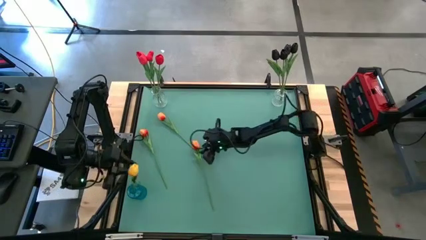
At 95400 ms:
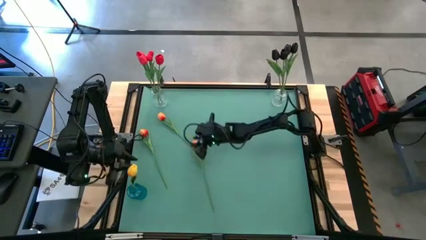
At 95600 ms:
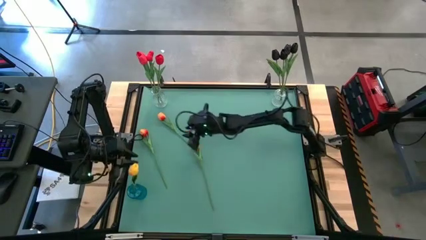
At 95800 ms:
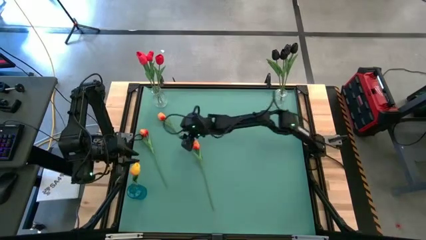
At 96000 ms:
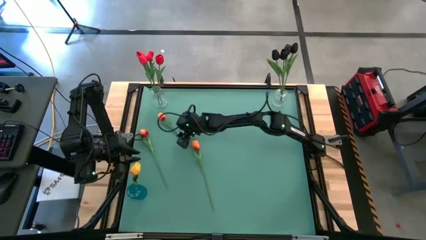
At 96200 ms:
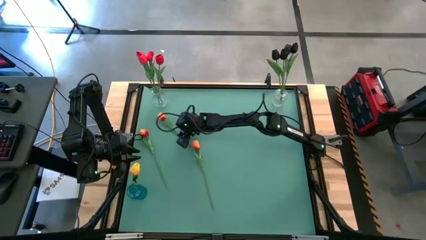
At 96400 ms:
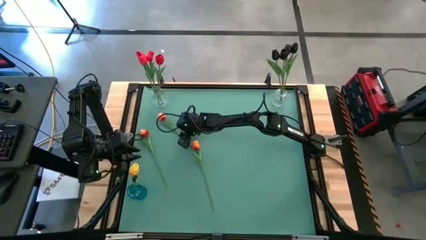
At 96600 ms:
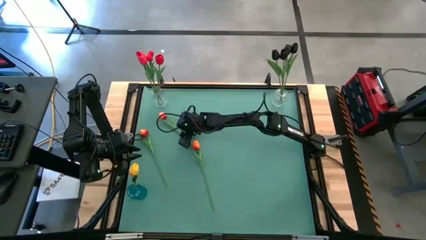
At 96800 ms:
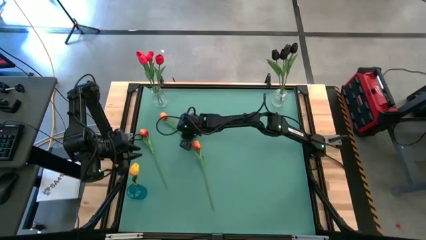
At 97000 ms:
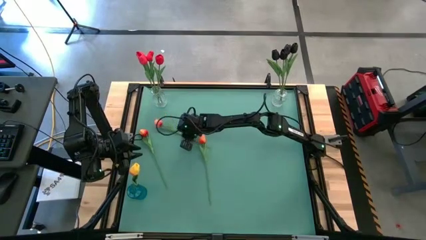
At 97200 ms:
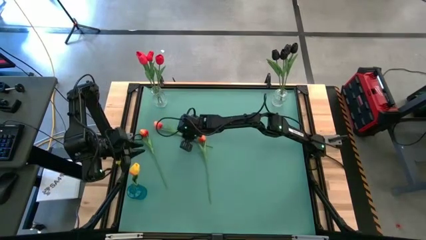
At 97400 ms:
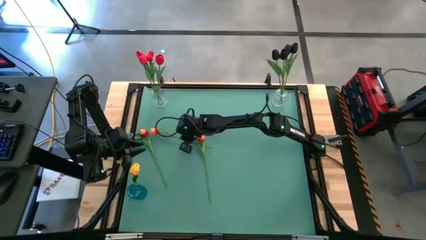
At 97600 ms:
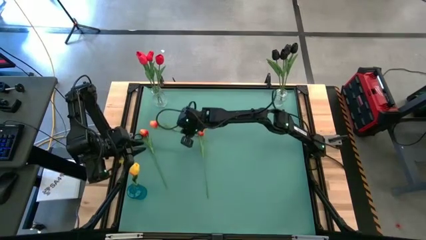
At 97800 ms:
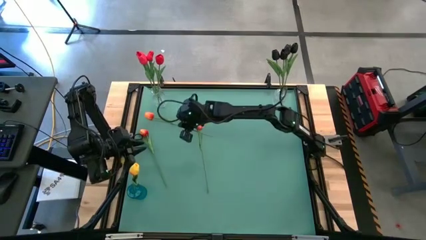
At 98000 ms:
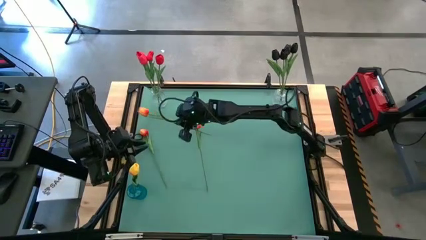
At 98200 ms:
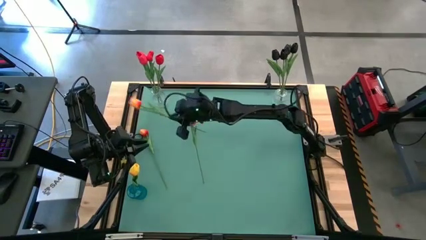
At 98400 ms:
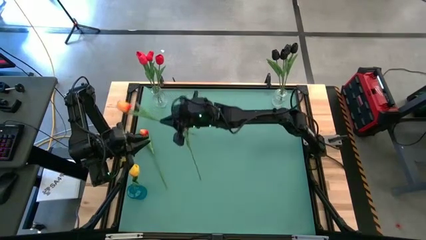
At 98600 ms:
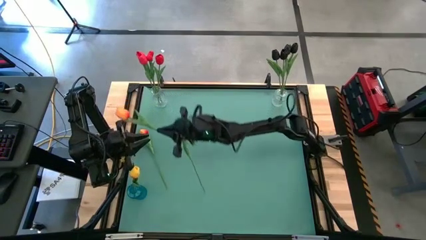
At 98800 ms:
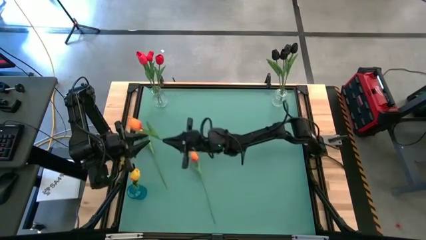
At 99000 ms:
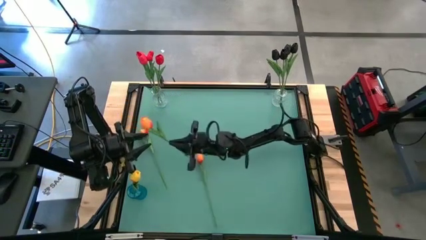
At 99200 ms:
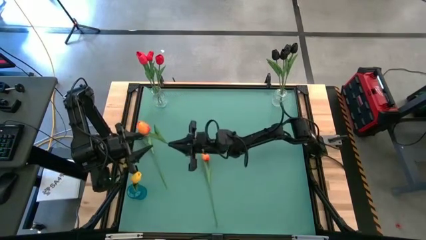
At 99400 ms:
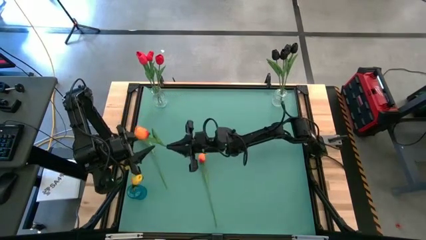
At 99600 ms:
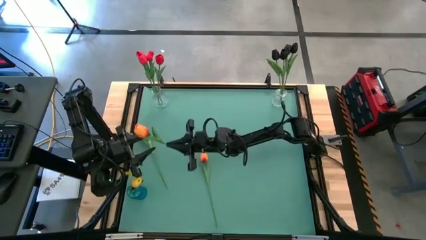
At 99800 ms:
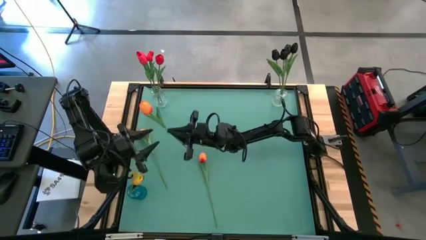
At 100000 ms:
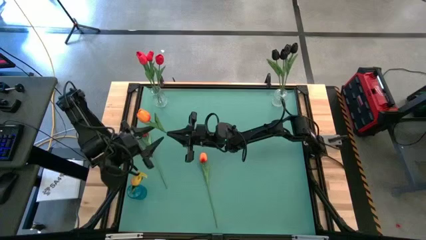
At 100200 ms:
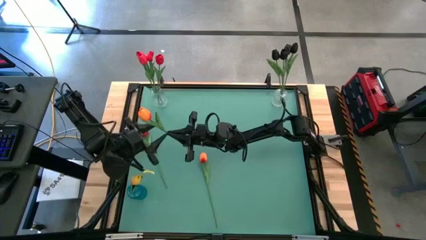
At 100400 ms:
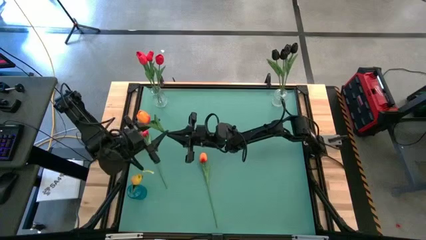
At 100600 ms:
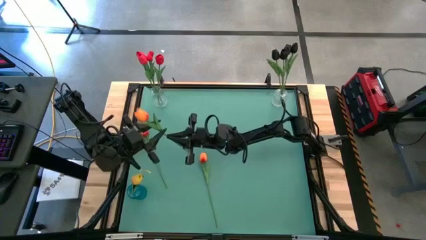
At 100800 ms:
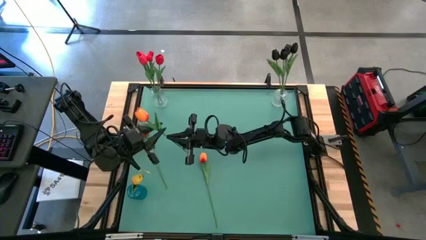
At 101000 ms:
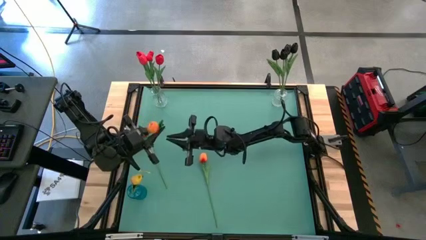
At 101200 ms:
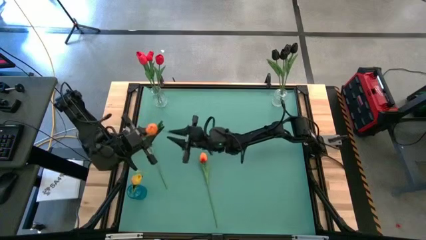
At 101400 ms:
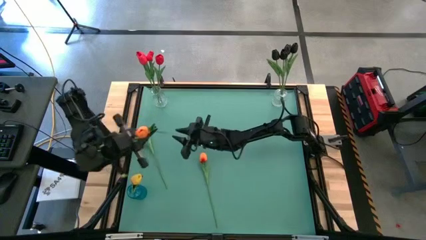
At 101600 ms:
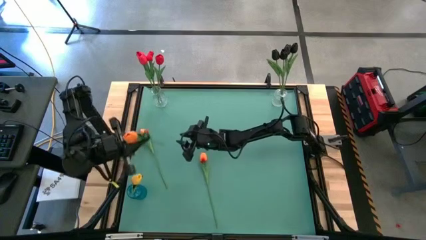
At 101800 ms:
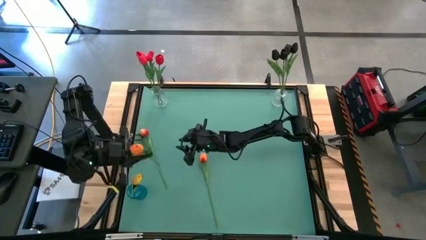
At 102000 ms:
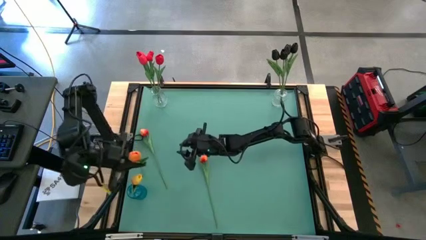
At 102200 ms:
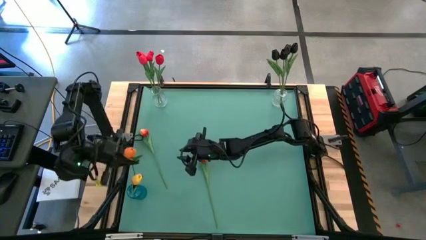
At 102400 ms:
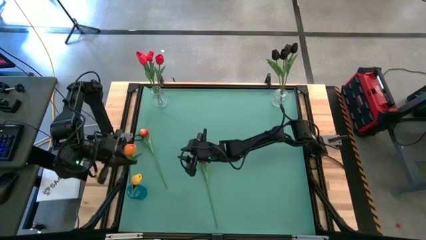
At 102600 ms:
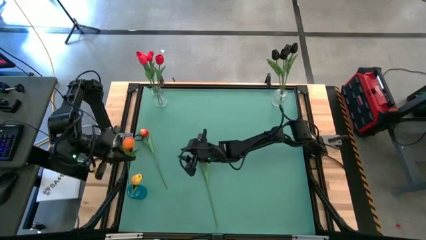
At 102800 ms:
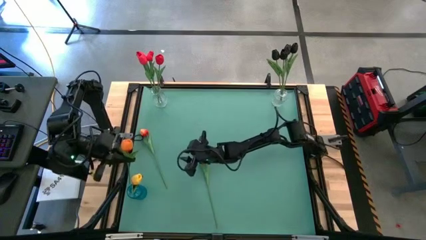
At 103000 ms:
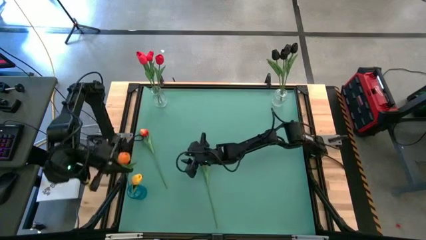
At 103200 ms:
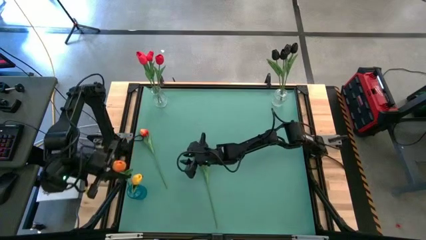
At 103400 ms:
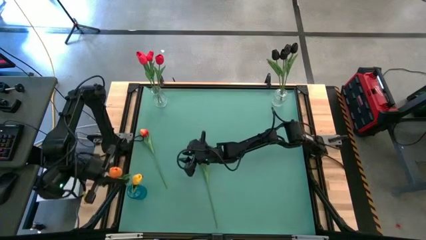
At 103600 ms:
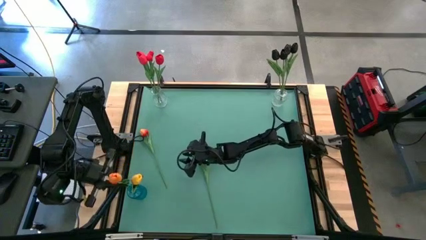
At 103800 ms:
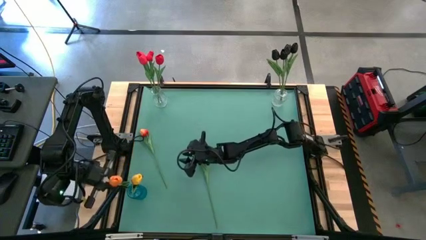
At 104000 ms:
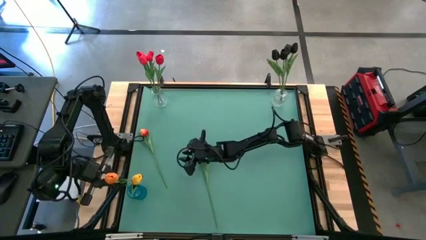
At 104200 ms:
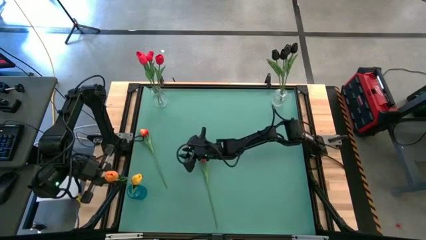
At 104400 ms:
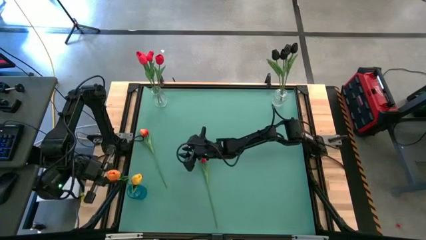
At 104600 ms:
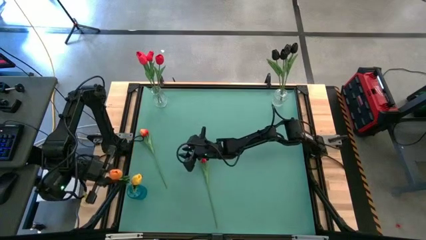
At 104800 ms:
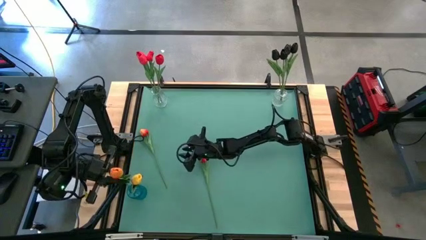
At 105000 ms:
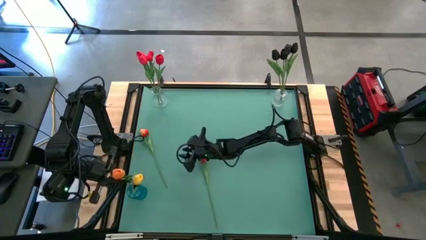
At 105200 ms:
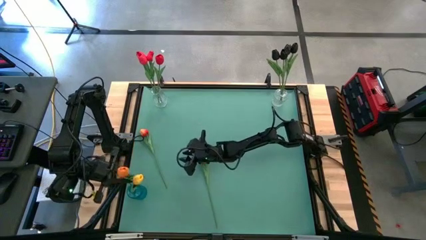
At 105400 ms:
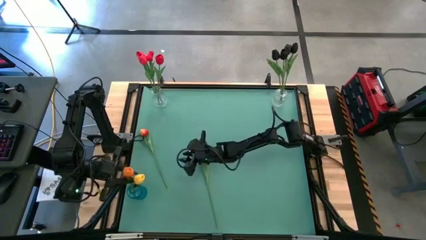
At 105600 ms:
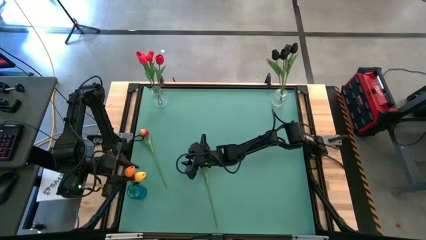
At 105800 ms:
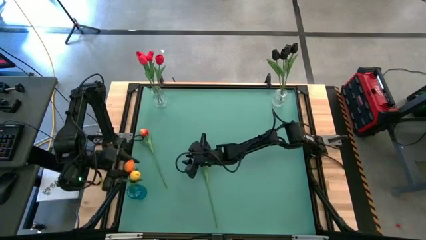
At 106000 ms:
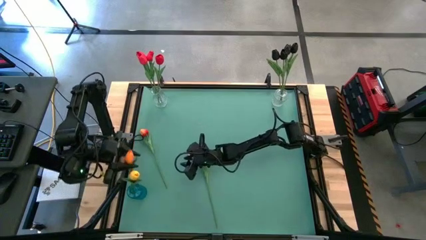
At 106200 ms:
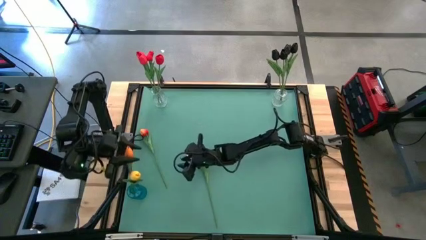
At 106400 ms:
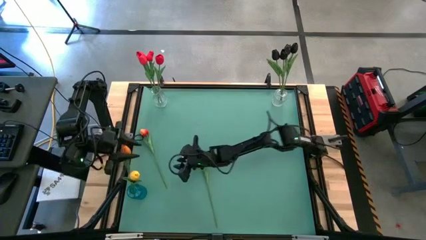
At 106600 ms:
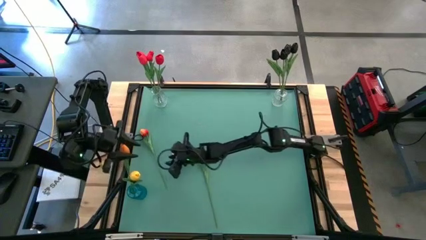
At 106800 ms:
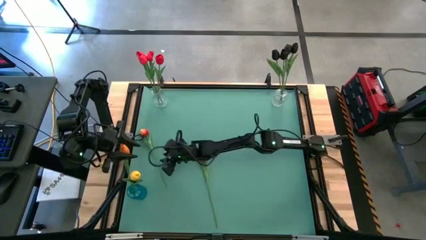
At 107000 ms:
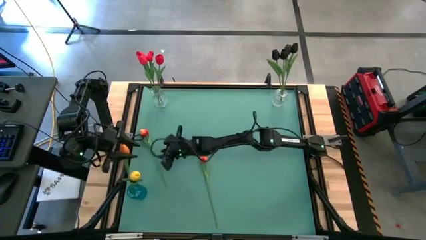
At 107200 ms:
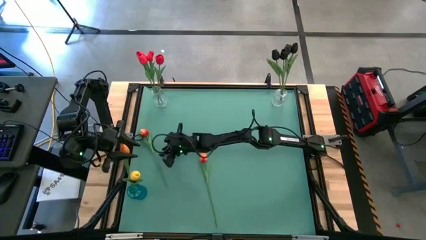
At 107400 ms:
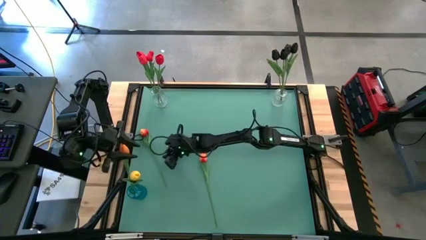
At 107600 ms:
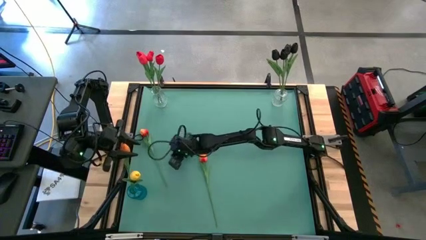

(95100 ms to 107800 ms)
Task: Sort flowers into vase by color
Put the orange tulip into the blue vase

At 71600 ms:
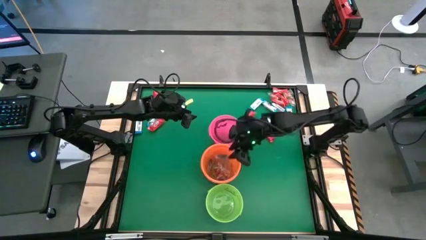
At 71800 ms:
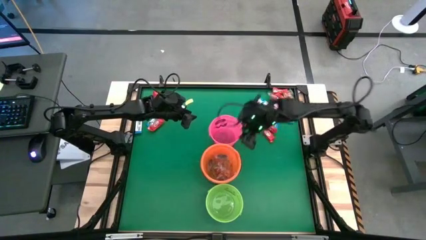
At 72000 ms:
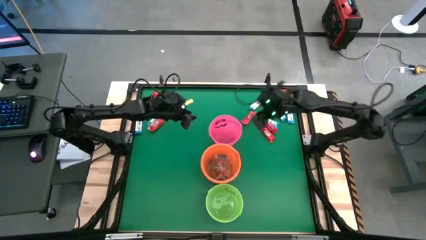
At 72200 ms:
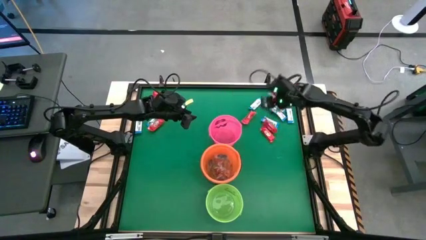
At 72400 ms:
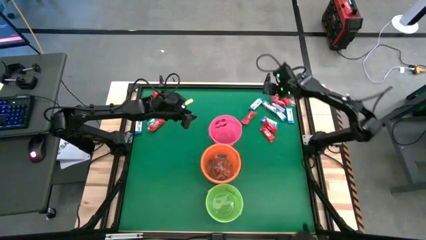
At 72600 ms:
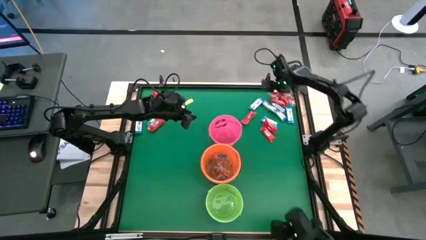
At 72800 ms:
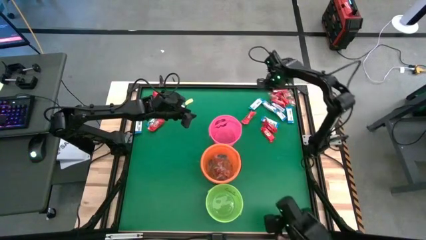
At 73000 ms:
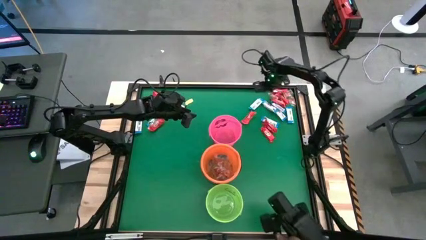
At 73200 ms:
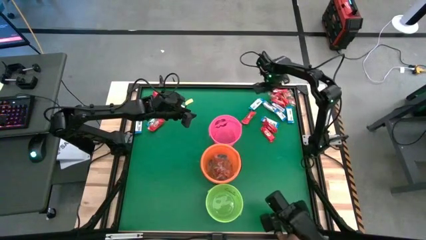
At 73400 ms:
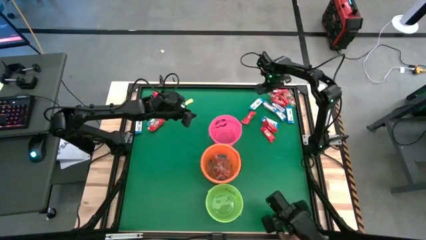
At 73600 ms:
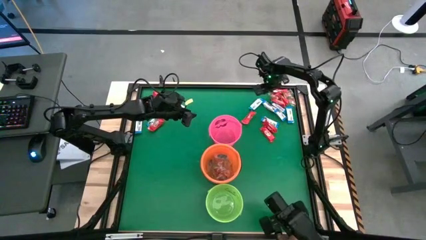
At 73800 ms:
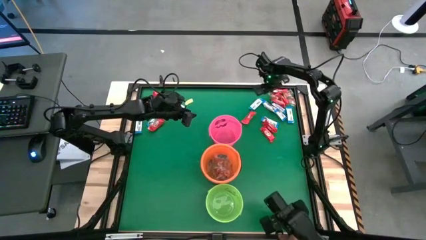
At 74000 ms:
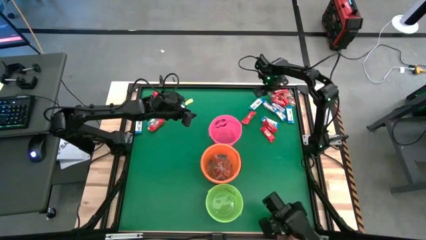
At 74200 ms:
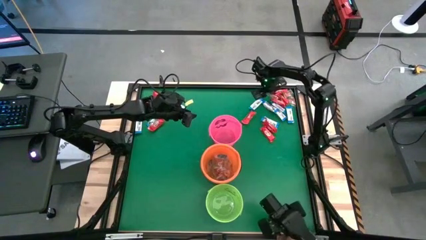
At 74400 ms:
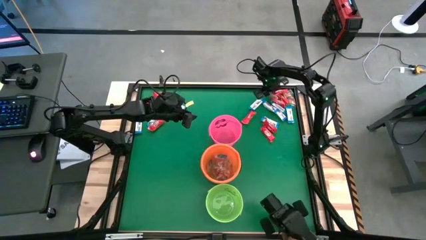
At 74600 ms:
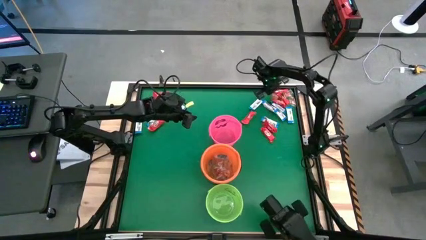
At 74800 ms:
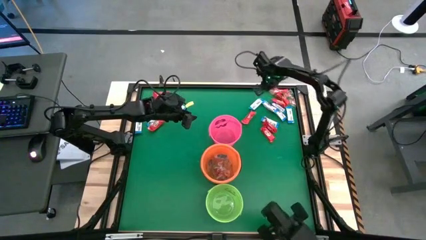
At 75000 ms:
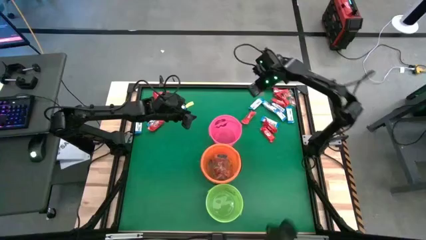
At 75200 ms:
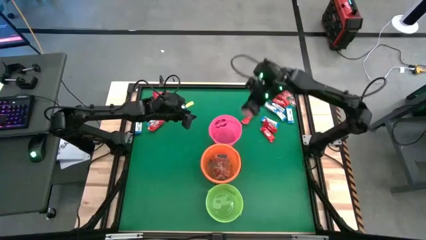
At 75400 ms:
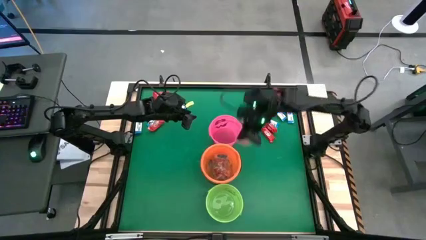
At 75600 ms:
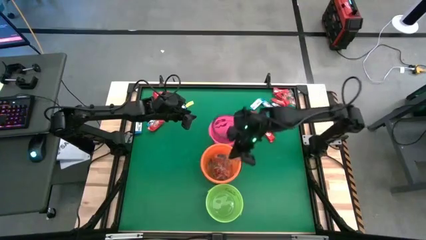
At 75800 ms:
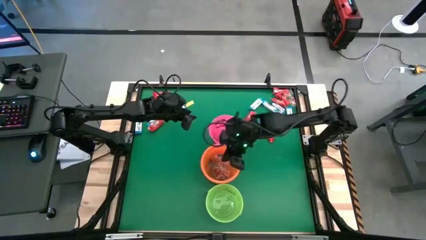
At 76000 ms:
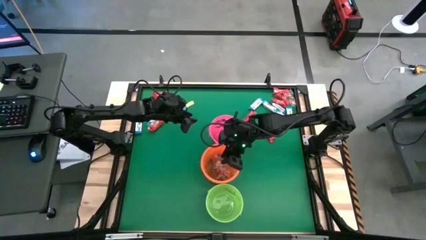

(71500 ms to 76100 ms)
Task: Sort candy by brand, put in halloween buckets
Put the orange gummy into the orange bucket
